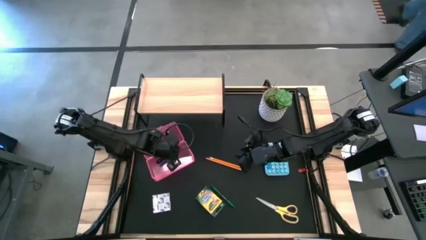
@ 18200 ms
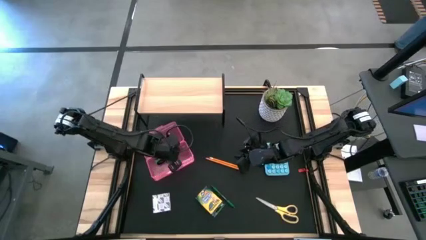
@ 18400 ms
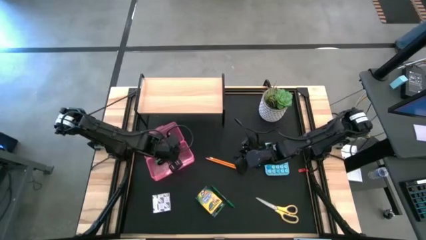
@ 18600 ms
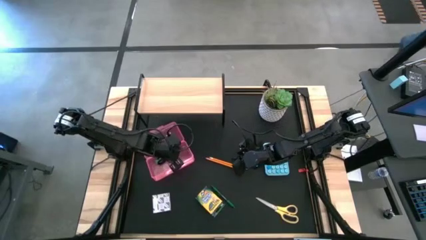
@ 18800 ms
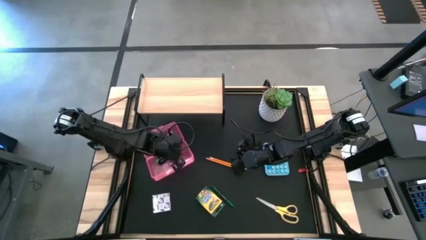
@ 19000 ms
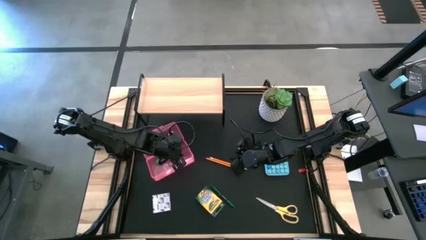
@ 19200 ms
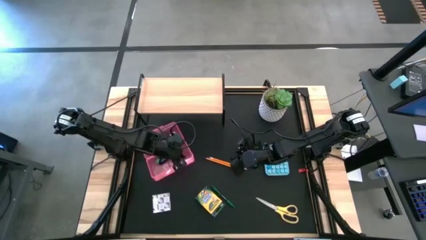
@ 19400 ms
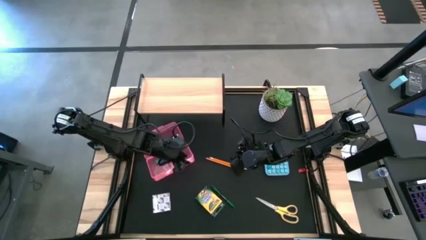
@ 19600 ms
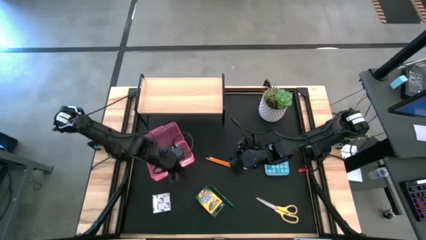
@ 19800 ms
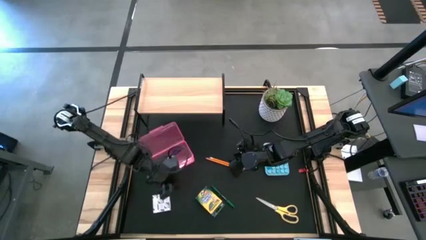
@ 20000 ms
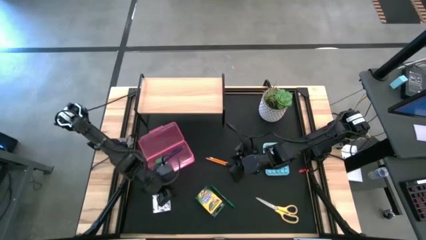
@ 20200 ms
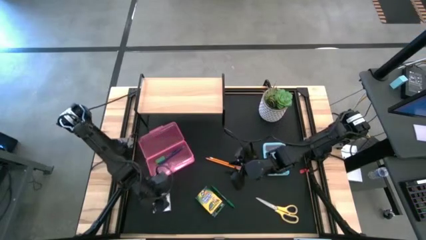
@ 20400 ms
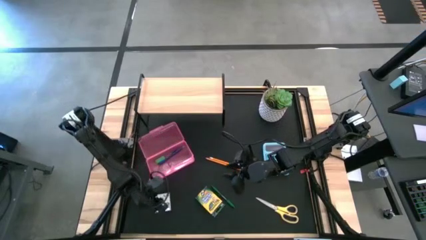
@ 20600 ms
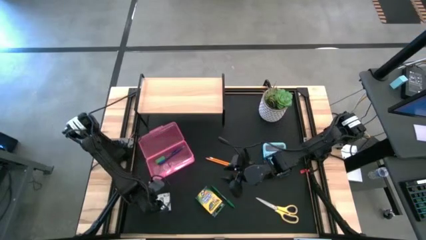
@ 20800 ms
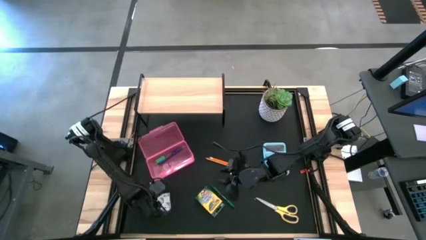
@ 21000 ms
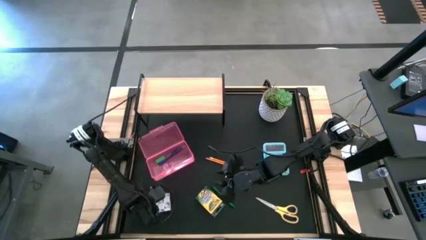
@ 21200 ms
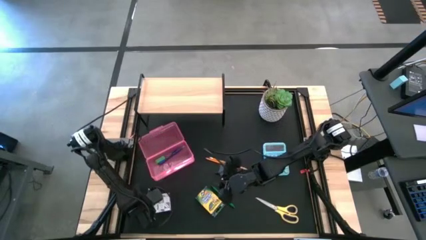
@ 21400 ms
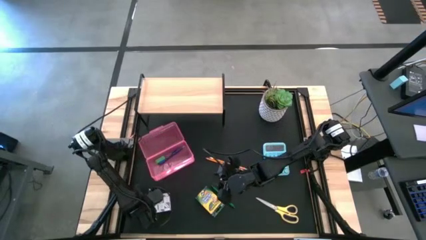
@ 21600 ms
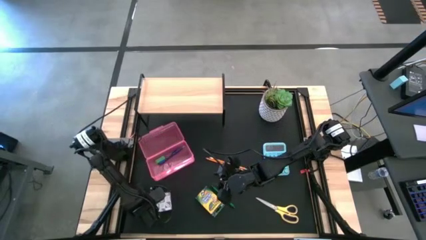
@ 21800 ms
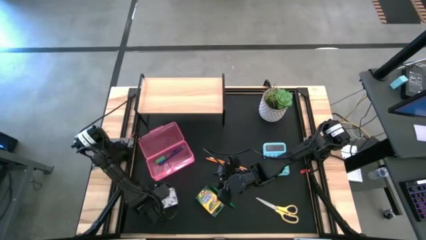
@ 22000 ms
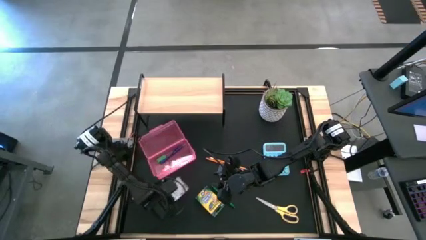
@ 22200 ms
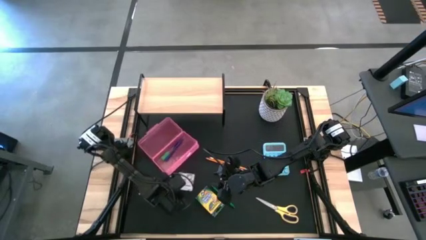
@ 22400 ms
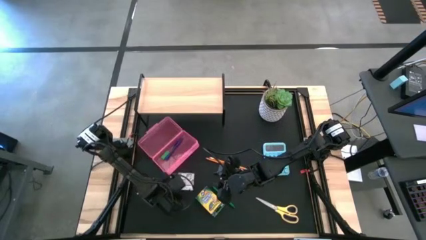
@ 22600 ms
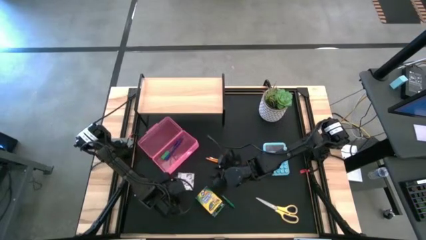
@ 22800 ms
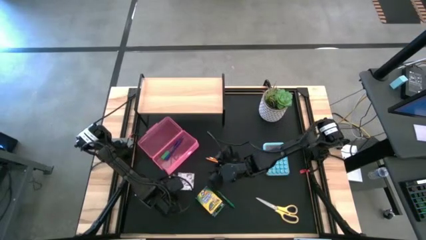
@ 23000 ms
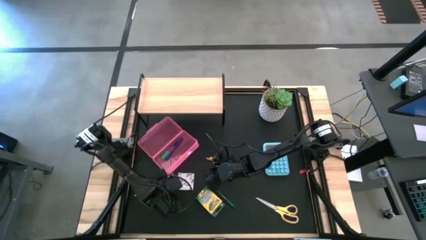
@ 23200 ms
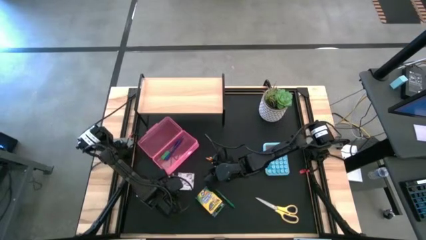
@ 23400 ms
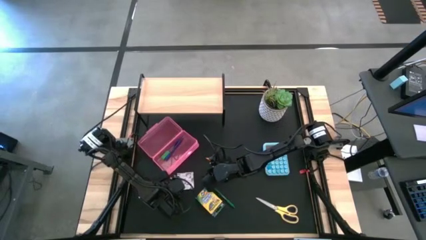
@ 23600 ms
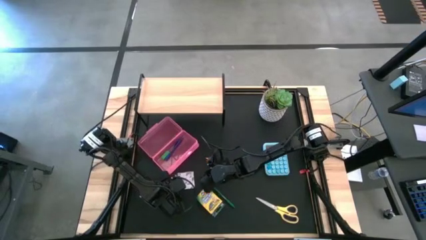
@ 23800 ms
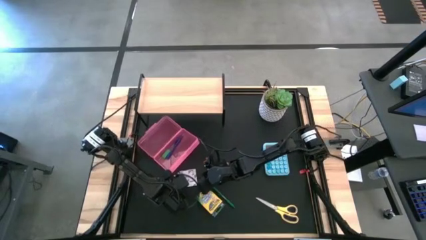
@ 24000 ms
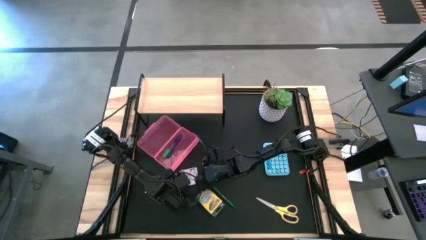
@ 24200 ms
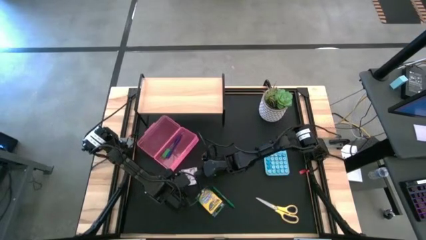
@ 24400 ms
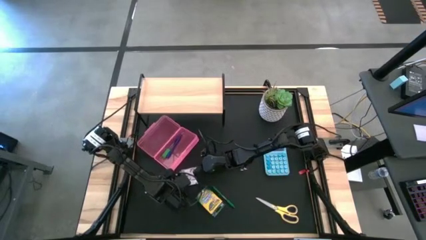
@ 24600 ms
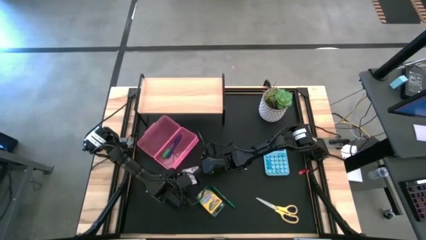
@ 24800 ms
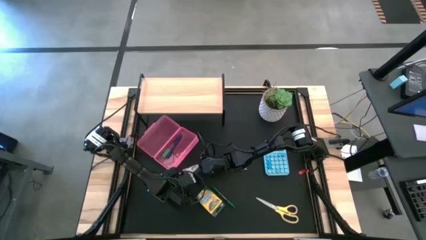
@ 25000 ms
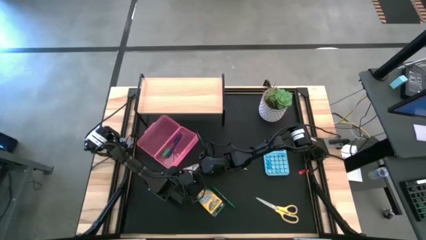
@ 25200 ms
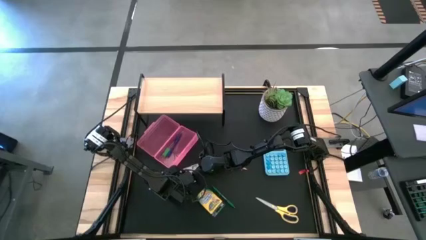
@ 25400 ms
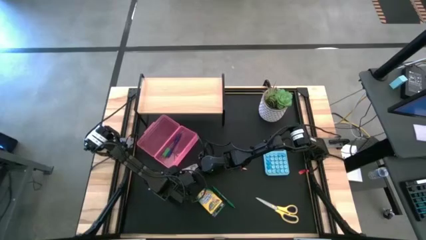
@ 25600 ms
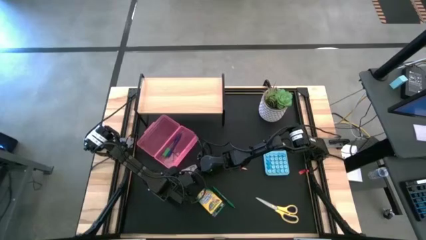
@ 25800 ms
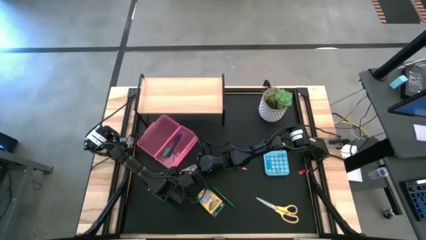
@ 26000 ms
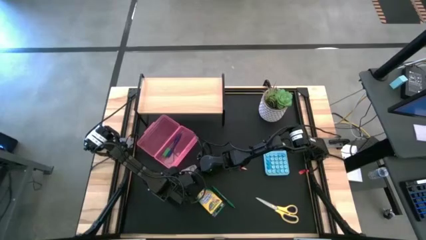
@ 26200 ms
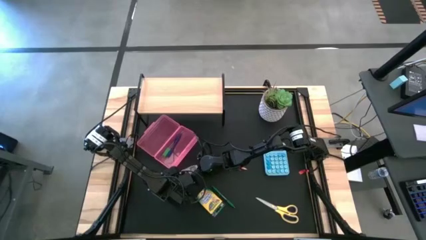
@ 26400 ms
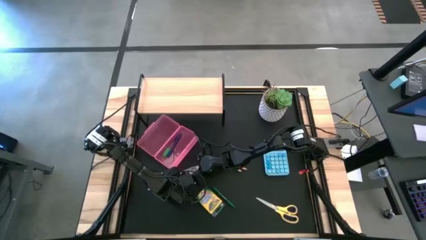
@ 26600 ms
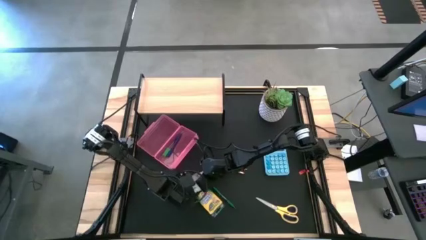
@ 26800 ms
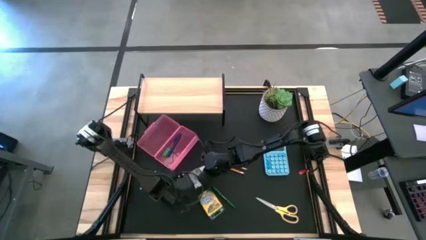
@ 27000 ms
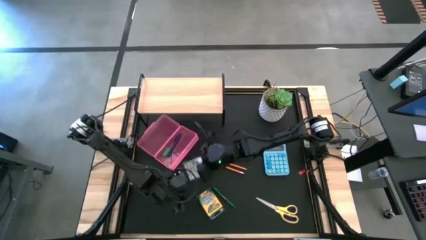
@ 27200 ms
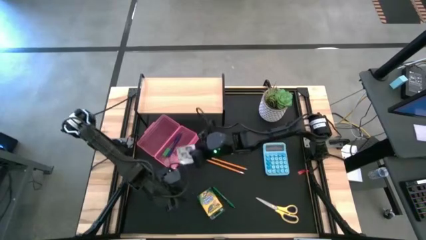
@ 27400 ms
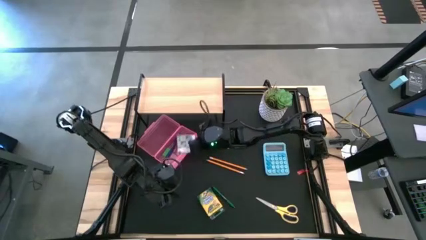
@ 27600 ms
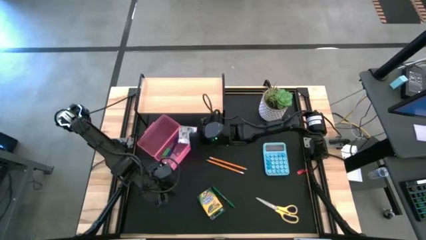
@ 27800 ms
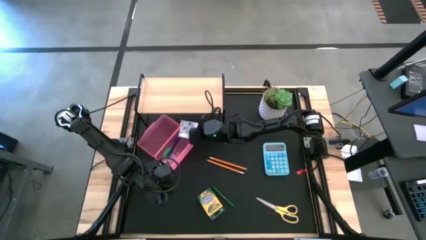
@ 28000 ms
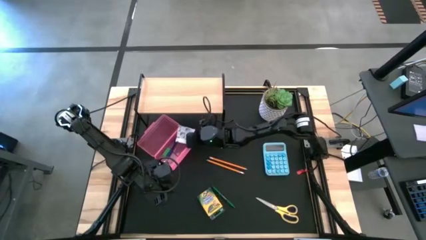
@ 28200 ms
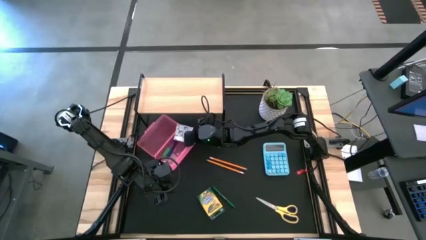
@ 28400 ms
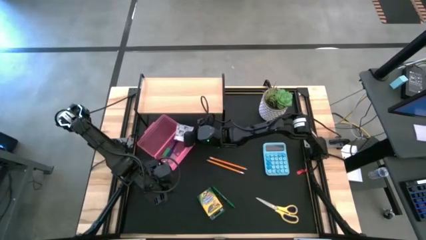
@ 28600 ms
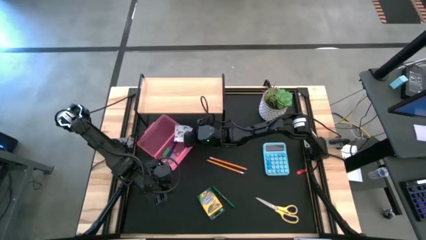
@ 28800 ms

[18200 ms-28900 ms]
Task: Pack school essentials
Put the sticky notes into the pencil box

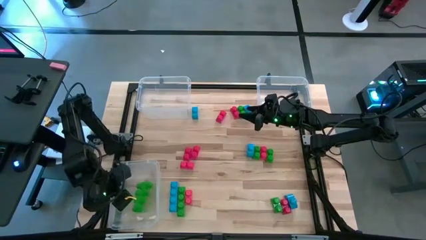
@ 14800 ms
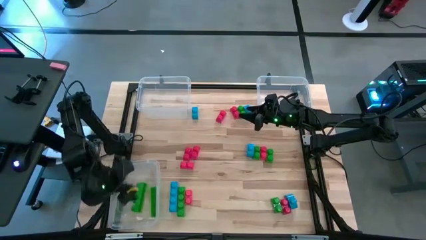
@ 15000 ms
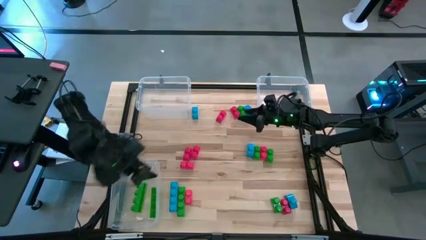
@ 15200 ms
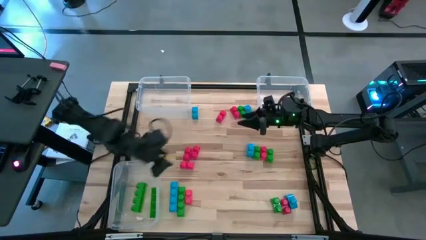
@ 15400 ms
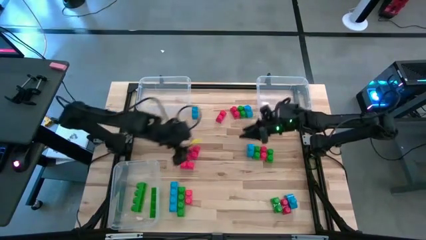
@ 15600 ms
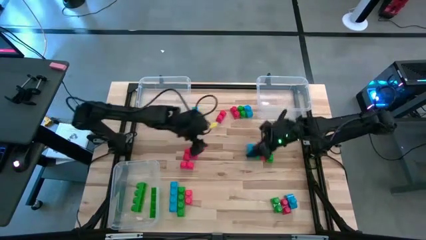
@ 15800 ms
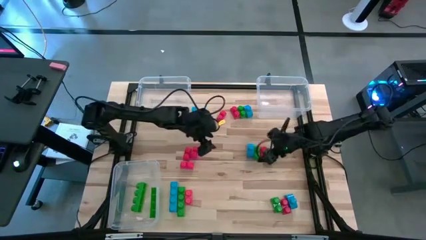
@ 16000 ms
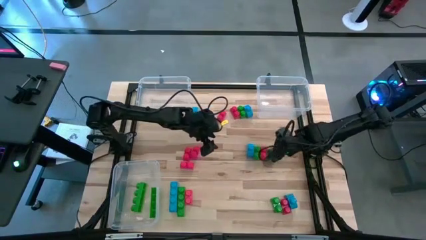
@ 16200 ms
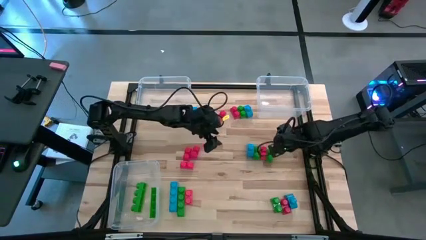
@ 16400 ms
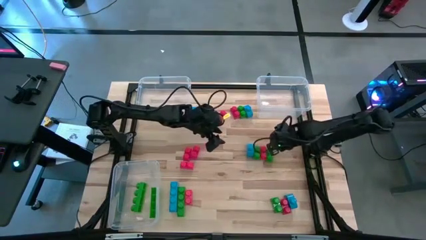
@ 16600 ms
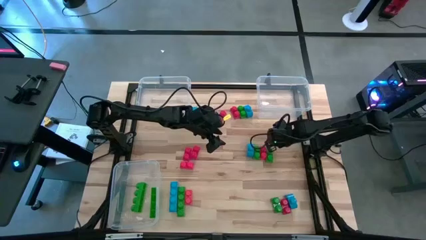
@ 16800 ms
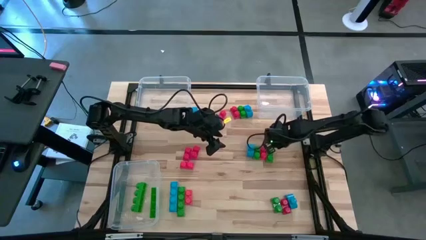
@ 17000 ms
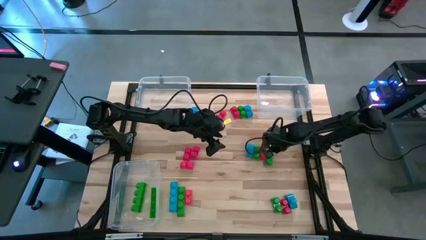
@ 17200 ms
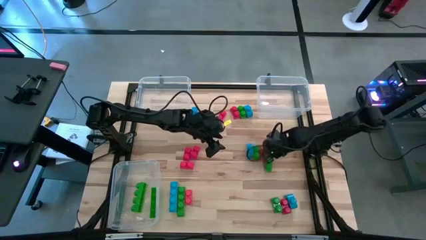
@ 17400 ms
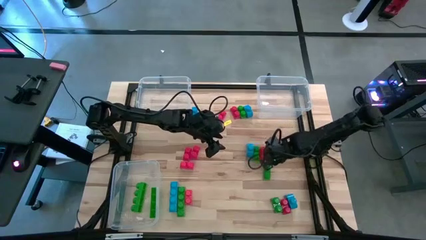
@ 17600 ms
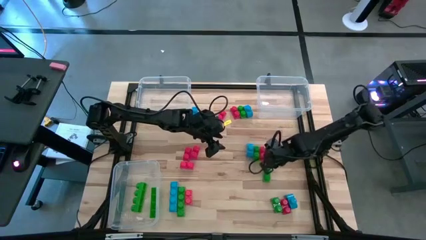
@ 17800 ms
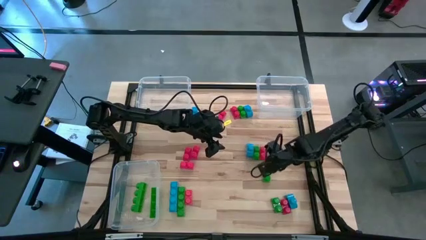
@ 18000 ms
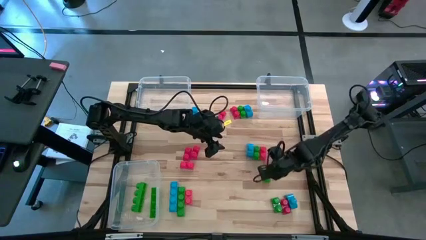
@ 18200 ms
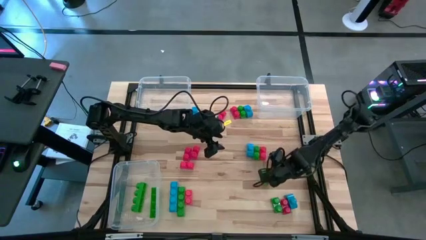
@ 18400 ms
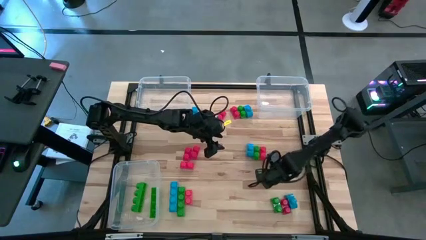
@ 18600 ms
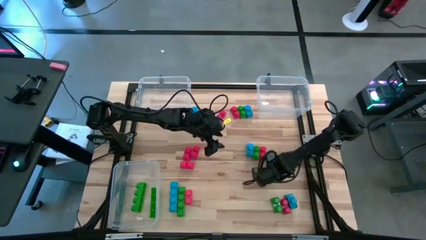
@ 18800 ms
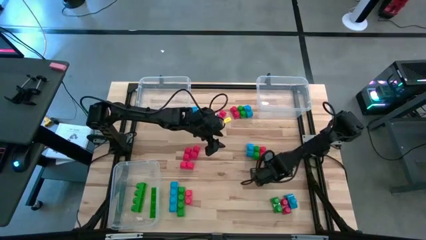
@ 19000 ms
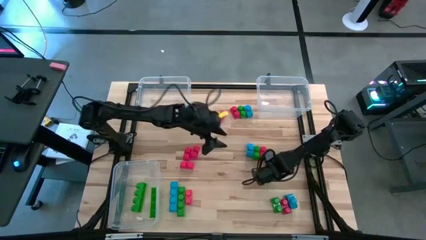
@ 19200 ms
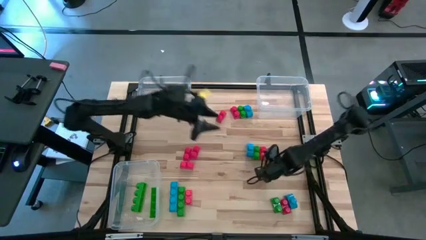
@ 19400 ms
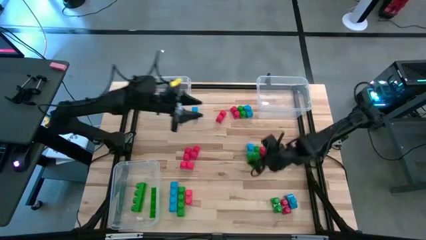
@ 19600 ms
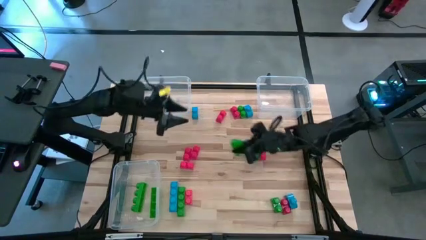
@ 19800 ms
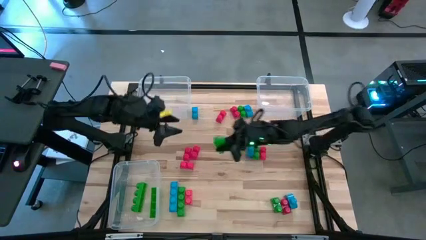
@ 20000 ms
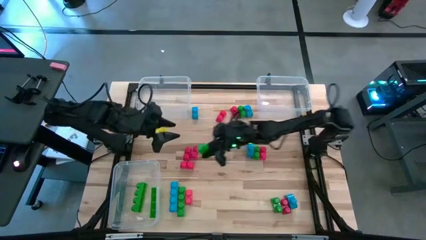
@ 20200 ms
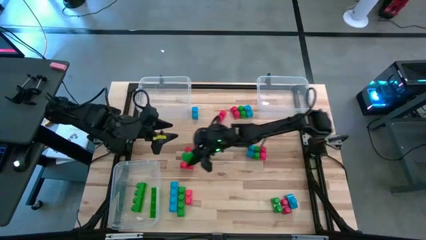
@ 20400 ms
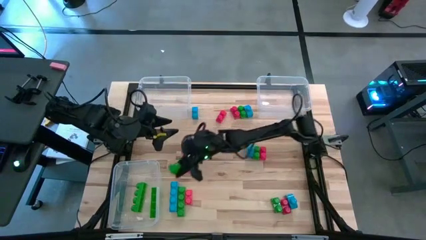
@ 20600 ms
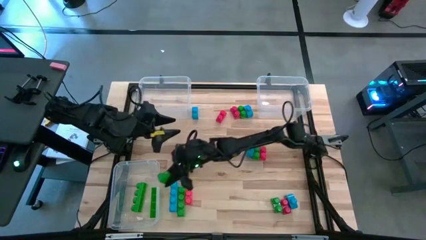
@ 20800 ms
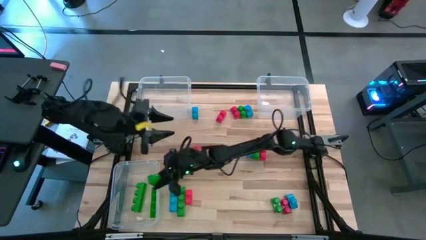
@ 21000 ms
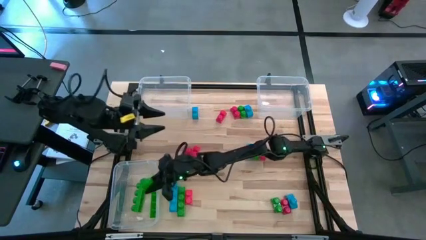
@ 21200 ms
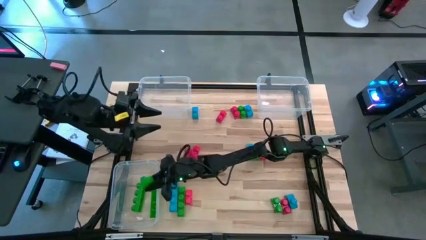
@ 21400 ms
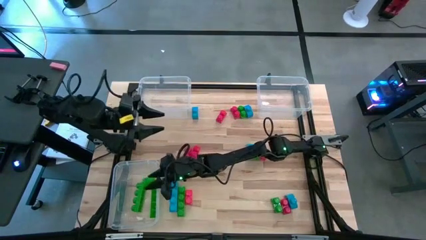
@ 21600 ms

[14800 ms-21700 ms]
Task: Sort blocks
Put the green game piece into the bottom left transparent bin
